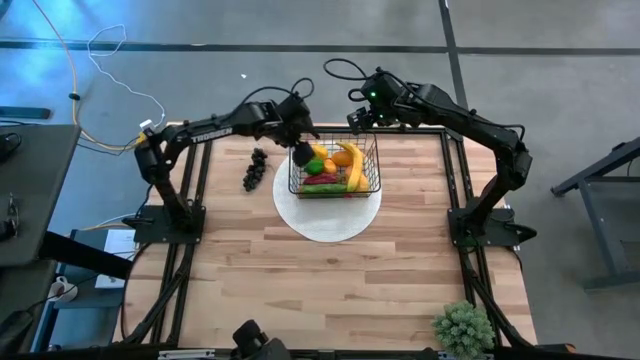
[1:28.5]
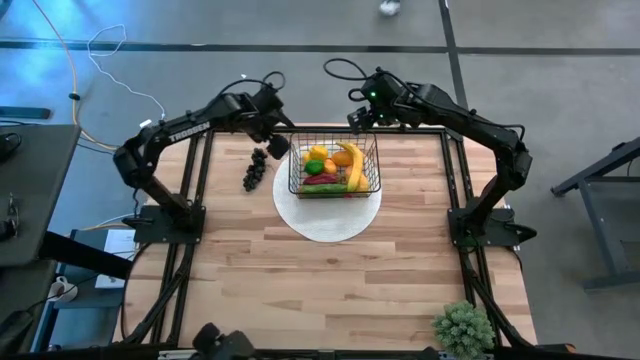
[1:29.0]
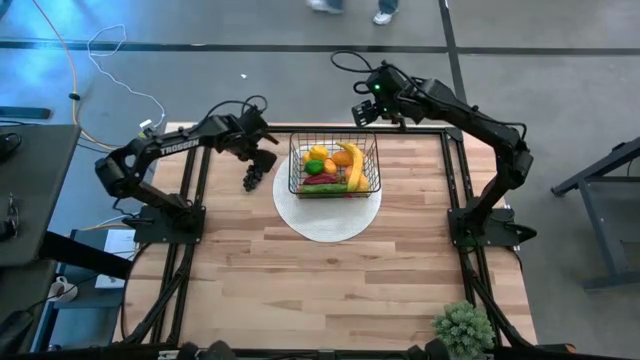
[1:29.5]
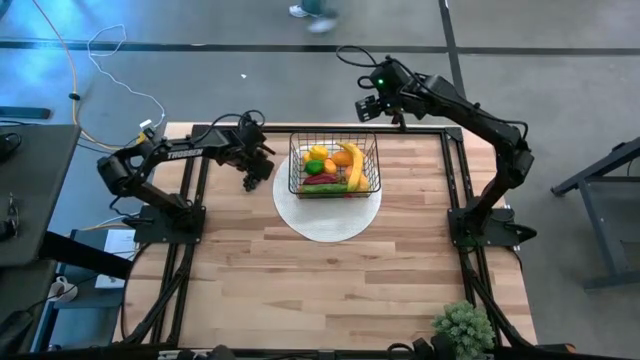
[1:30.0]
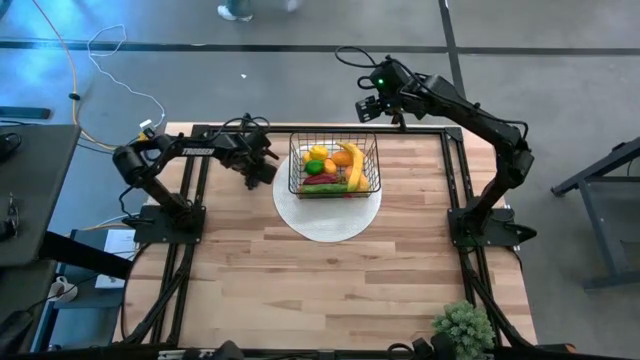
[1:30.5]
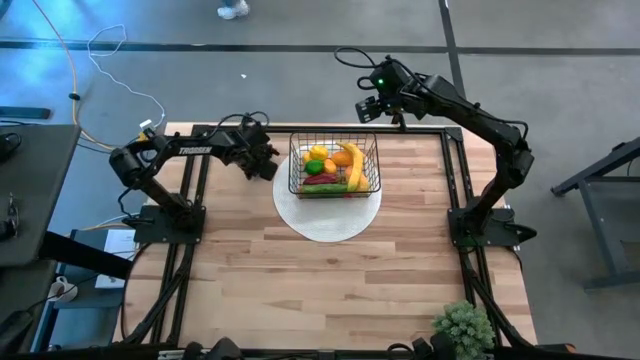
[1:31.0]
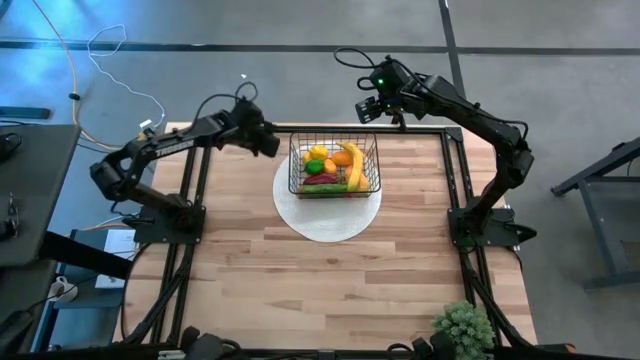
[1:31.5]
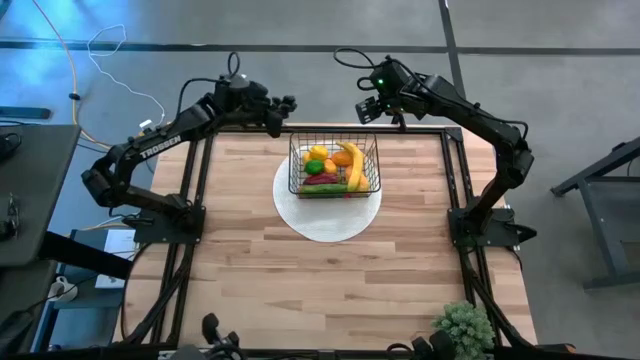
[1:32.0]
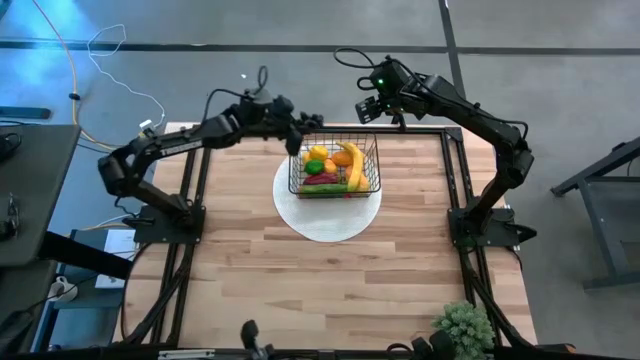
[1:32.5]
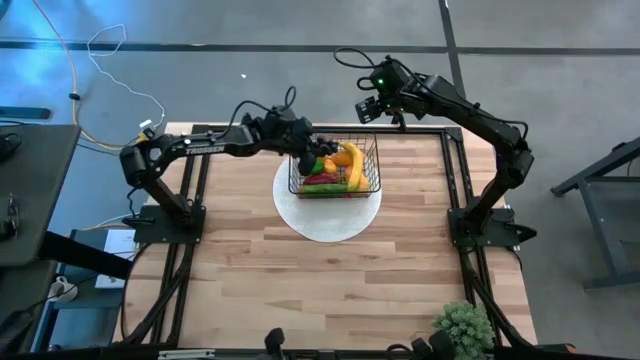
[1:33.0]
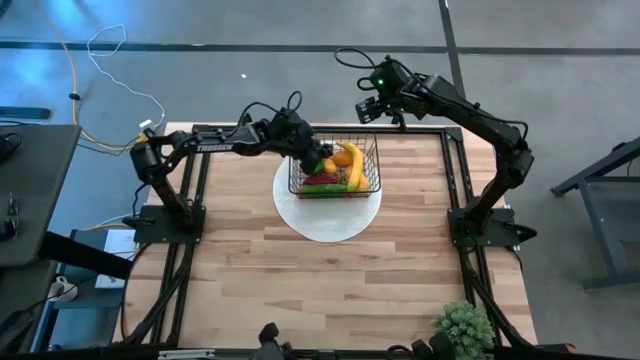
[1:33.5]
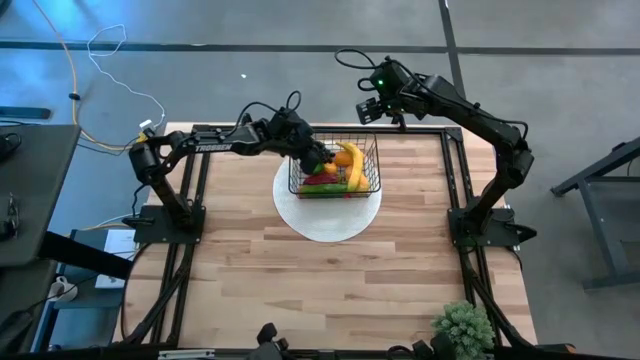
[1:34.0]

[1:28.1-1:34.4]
Task: Build produce basket
Put the black grapes into the wire basket

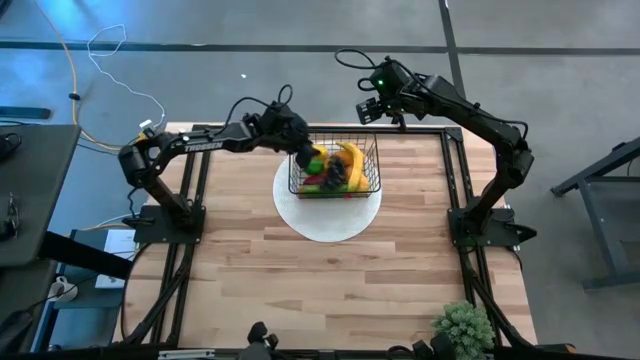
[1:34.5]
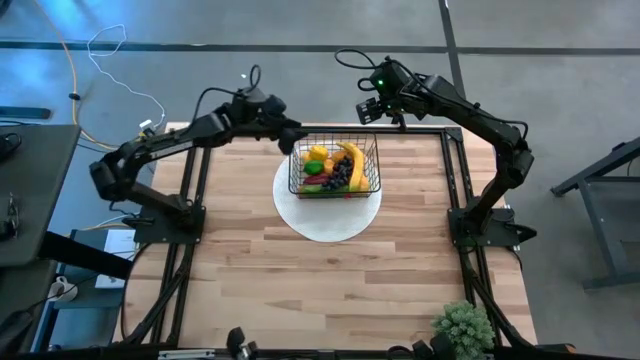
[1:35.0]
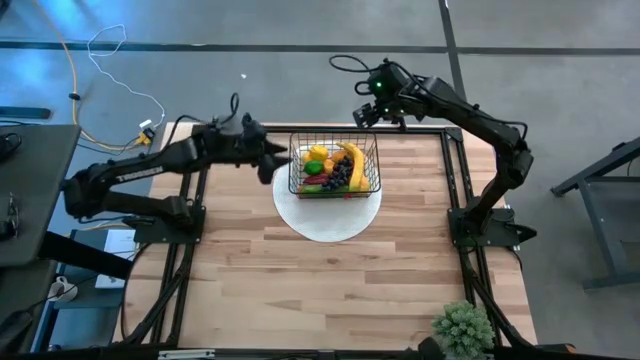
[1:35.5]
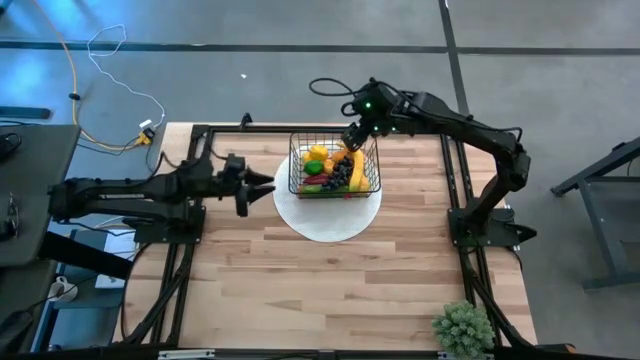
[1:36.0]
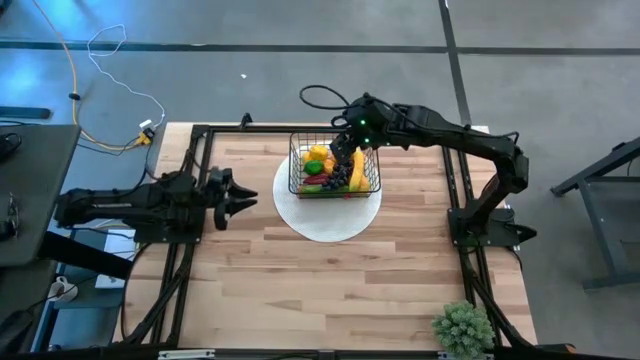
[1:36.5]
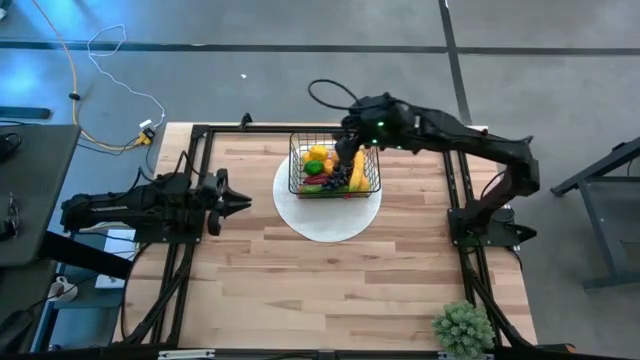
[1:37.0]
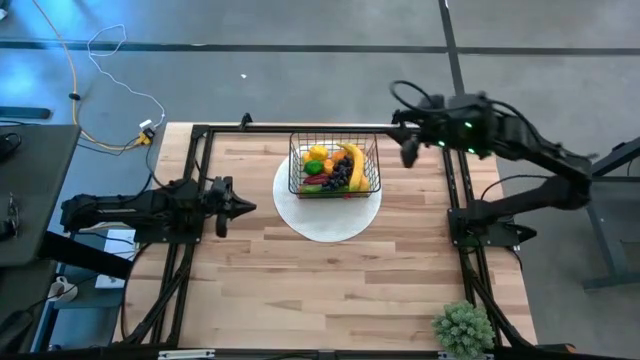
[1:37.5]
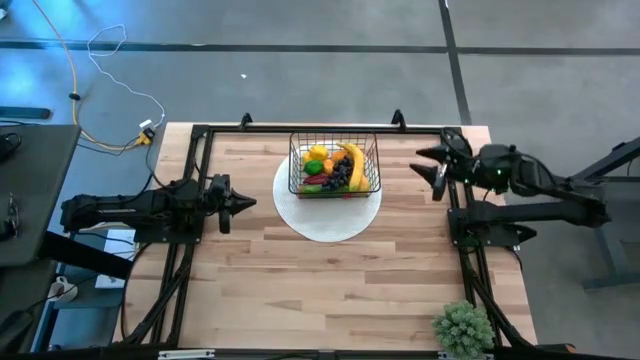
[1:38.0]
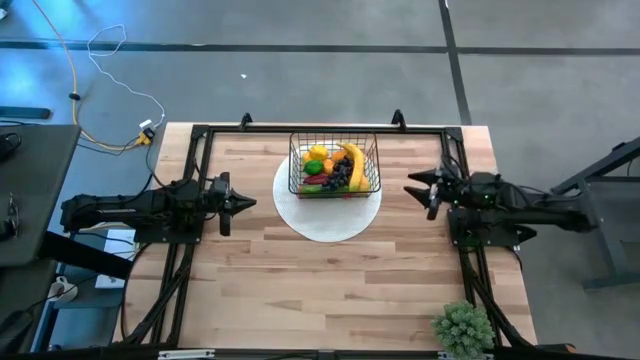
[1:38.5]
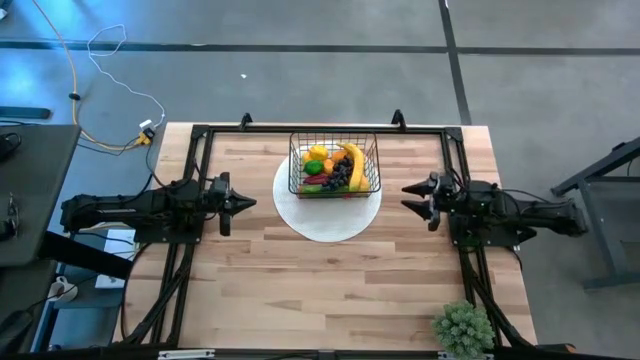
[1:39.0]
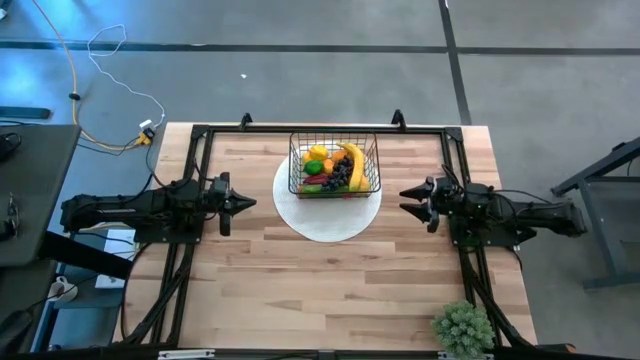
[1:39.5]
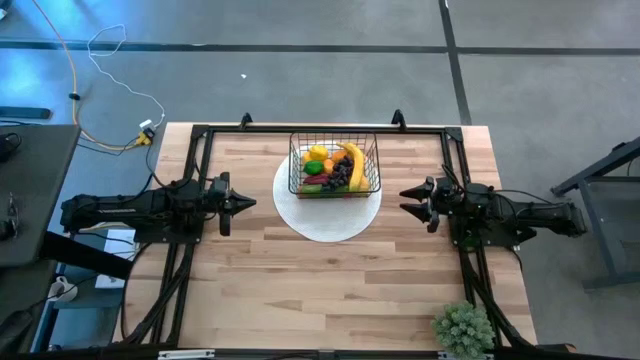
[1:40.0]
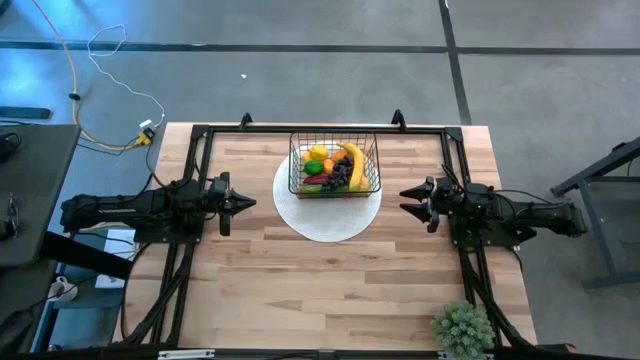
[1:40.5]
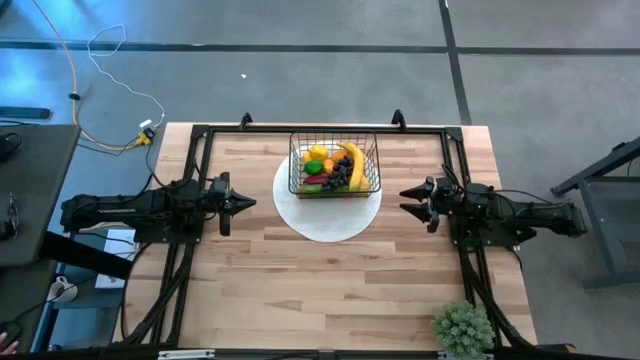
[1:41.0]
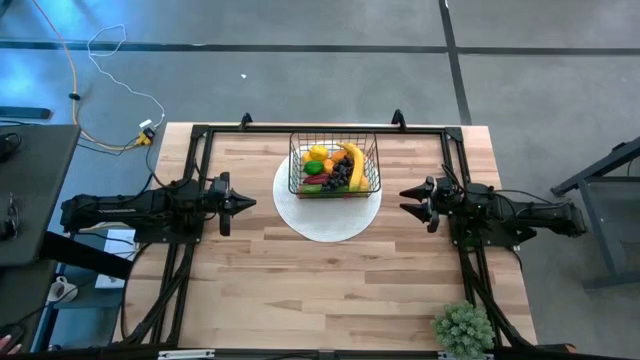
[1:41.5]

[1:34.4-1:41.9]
Return to Home Position

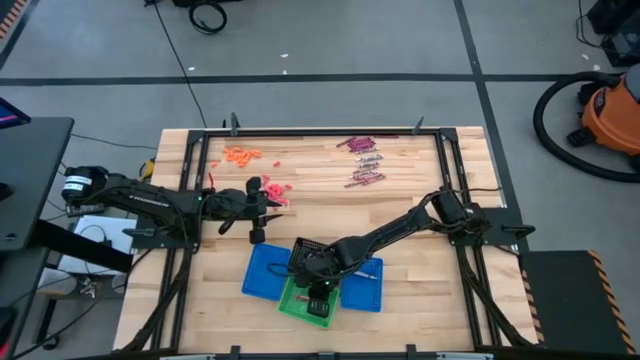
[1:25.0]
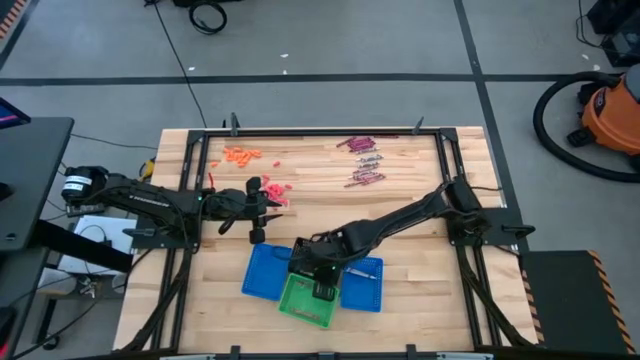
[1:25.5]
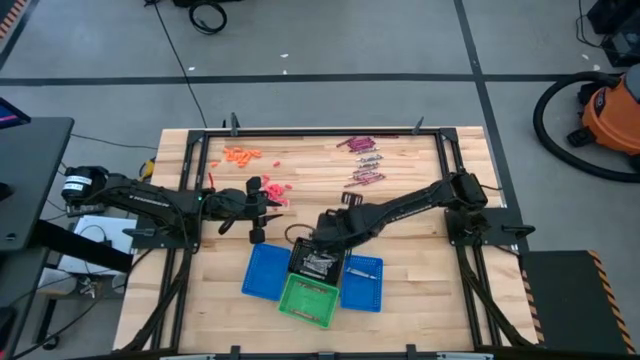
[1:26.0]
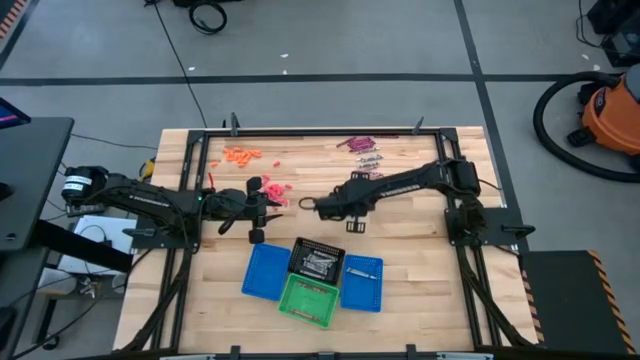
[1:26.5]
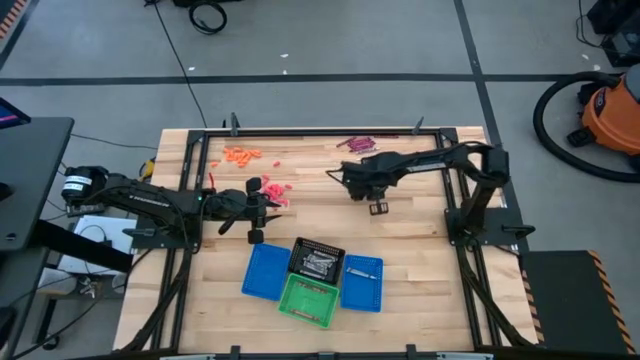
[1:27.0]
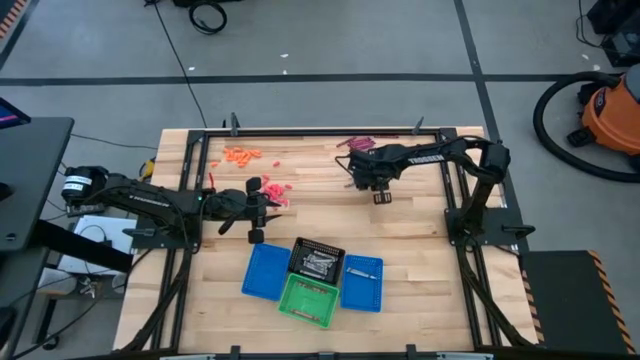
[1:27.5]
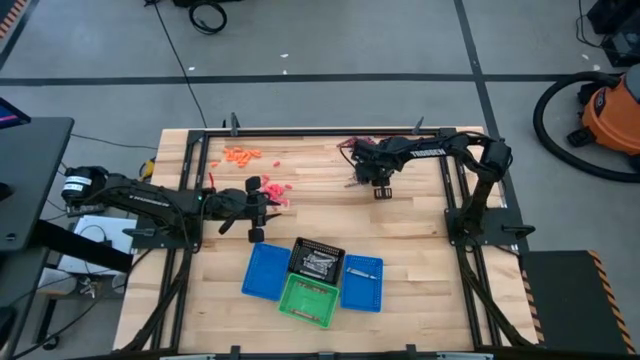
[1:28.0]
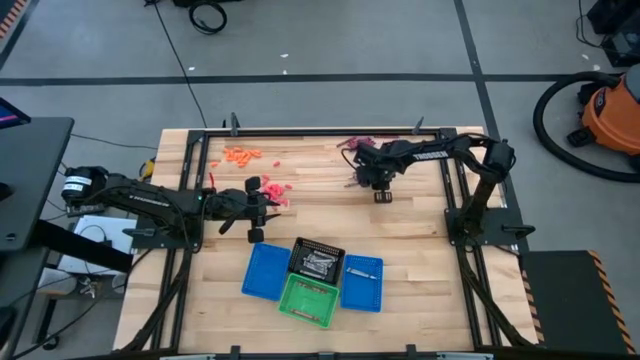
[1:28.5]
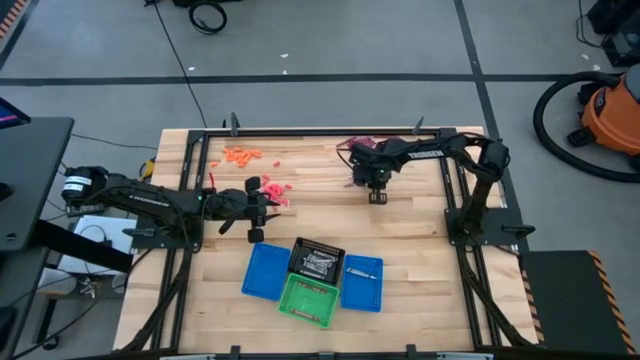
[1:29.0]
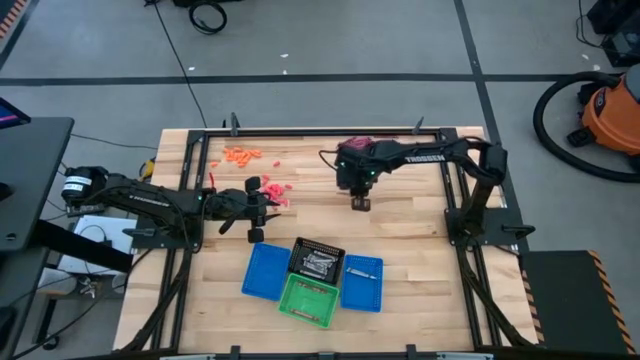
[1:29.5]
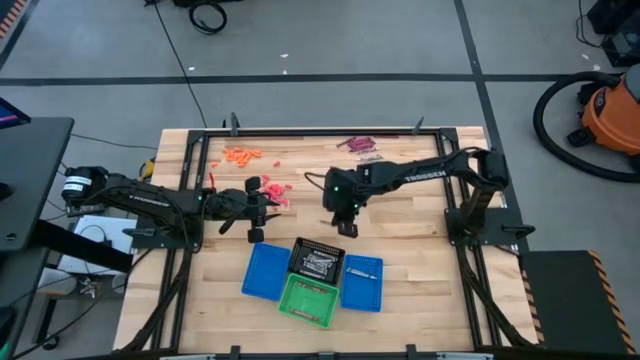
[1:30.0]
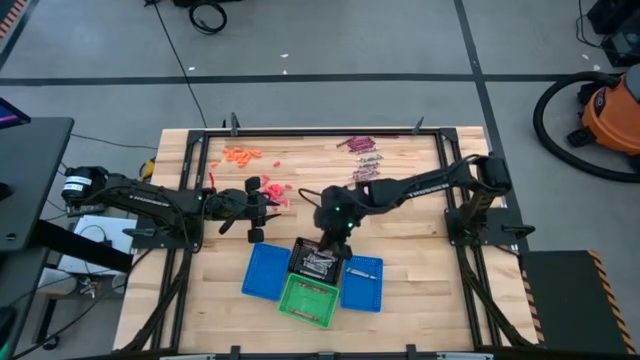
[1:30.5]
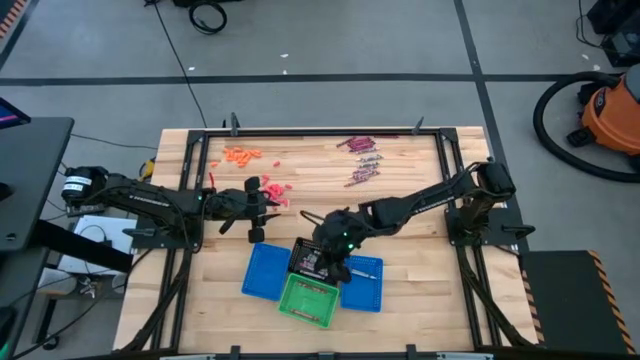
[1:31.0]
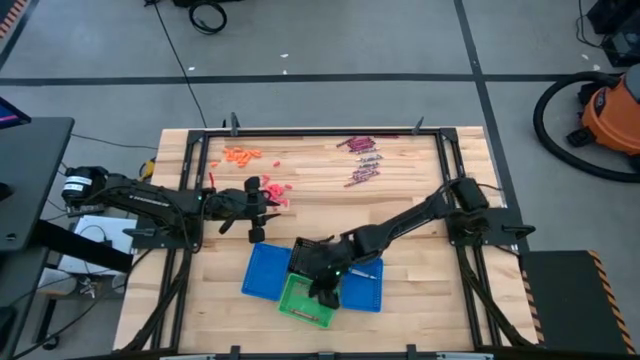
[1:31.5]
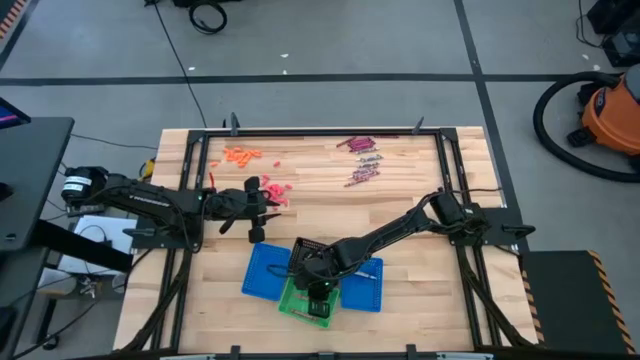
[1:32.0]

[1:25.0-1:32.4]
Task: Sort crayons
Put the pink crayon into the green bin
